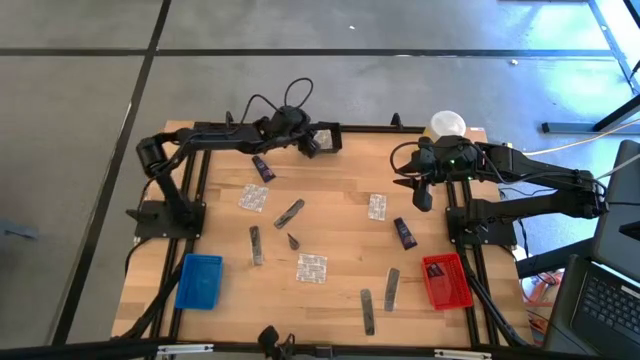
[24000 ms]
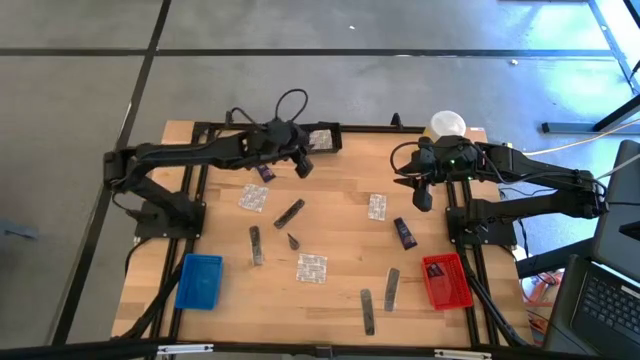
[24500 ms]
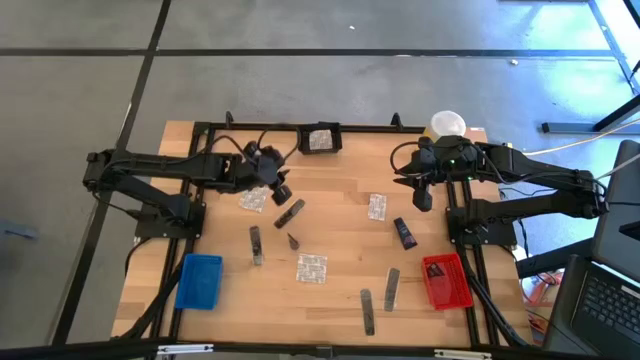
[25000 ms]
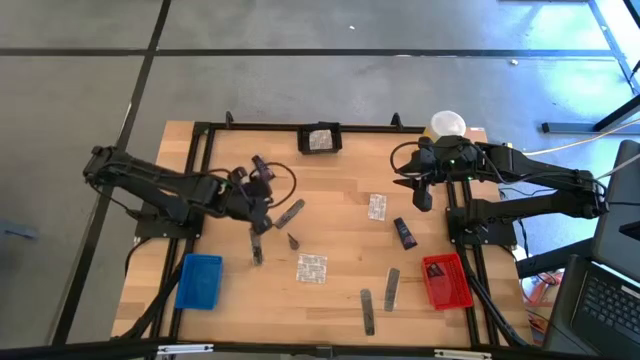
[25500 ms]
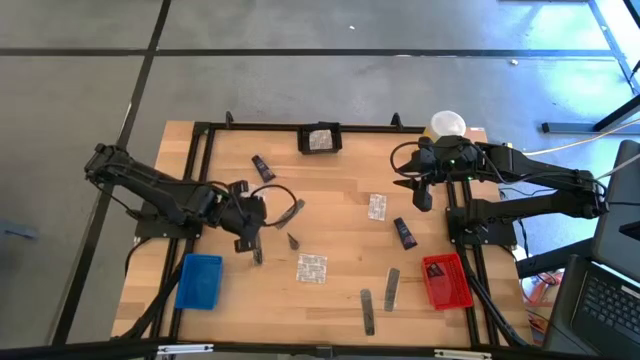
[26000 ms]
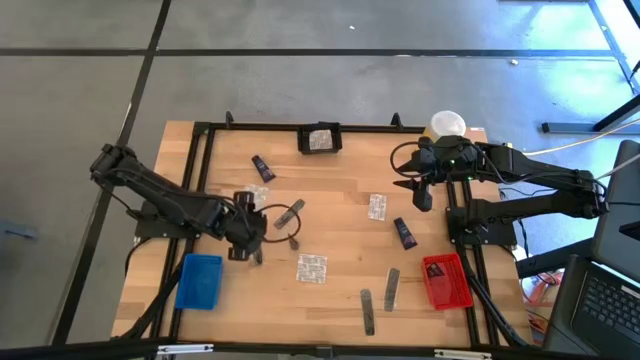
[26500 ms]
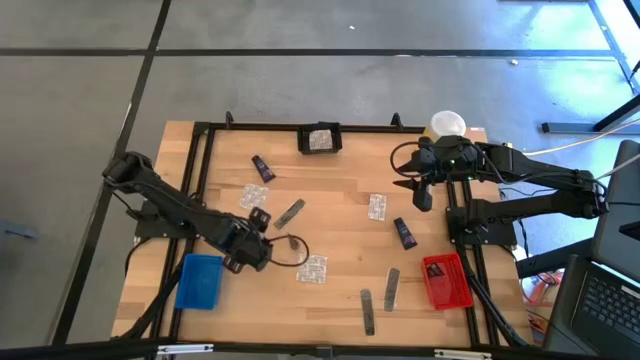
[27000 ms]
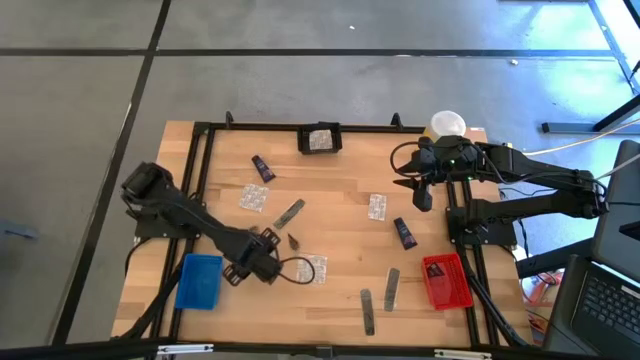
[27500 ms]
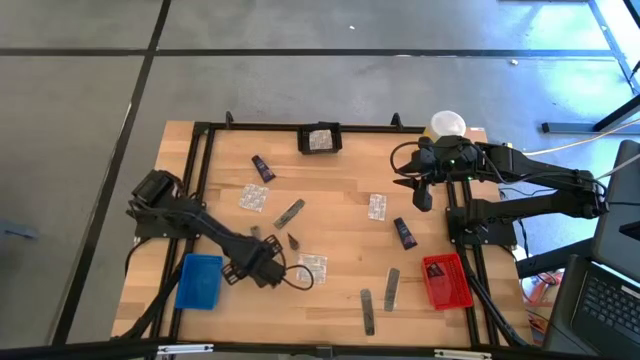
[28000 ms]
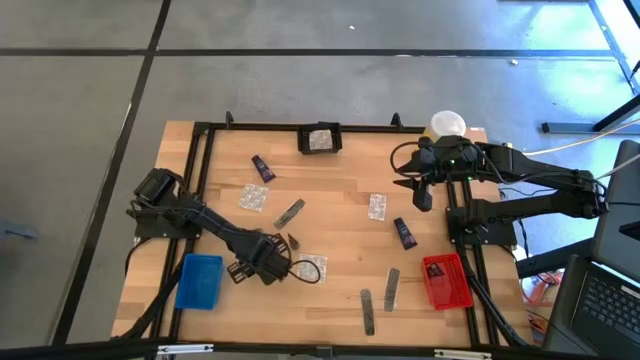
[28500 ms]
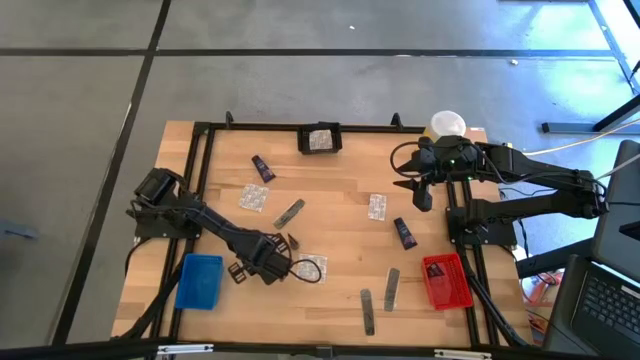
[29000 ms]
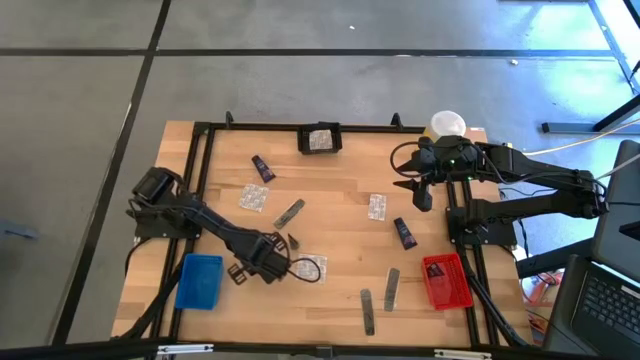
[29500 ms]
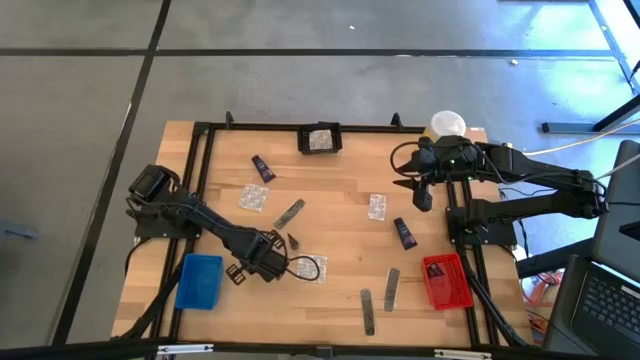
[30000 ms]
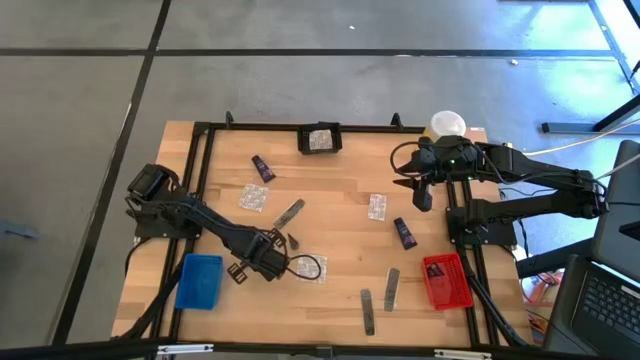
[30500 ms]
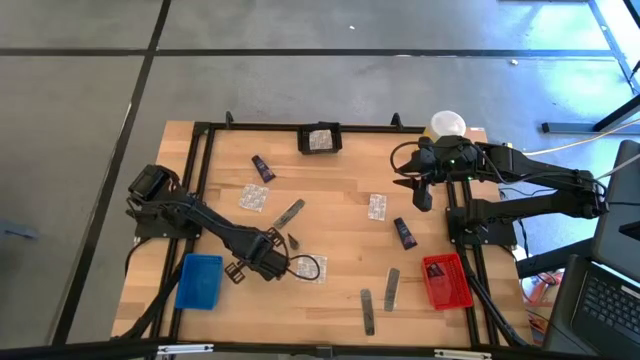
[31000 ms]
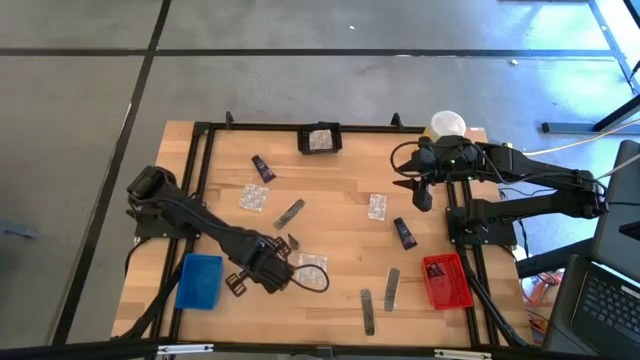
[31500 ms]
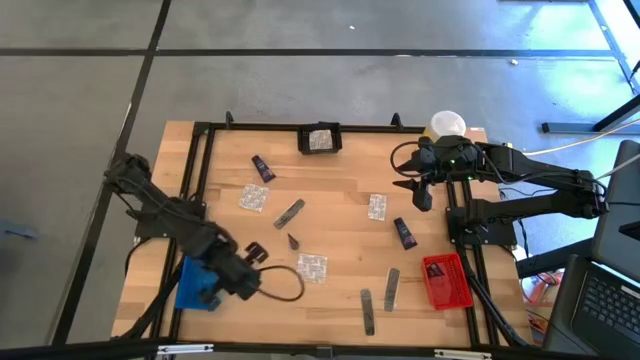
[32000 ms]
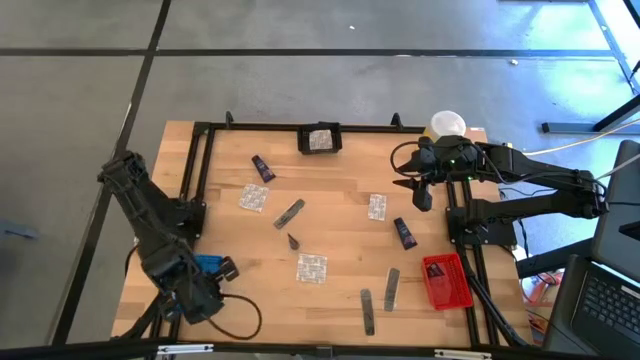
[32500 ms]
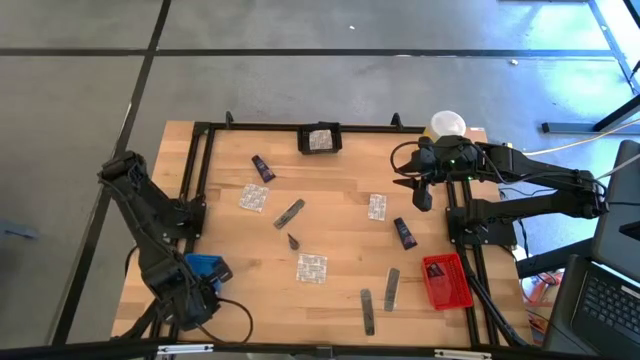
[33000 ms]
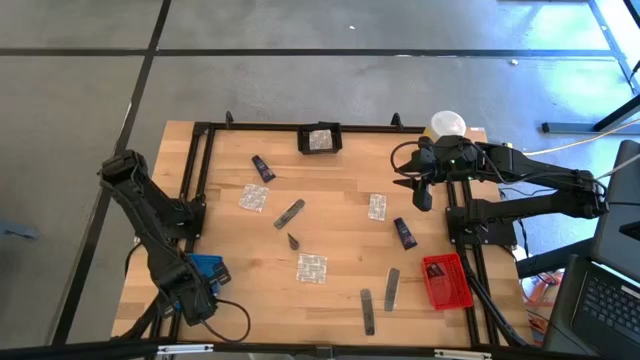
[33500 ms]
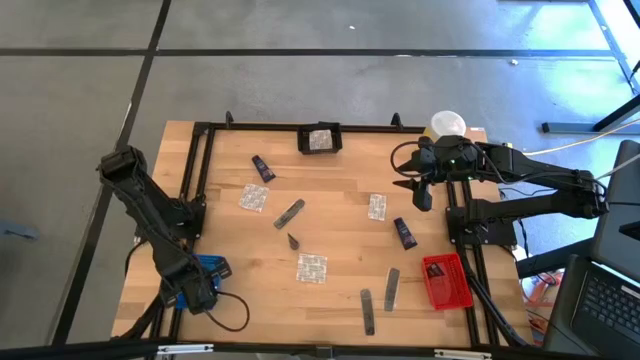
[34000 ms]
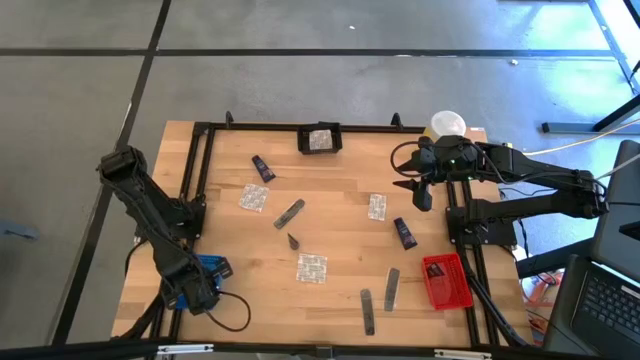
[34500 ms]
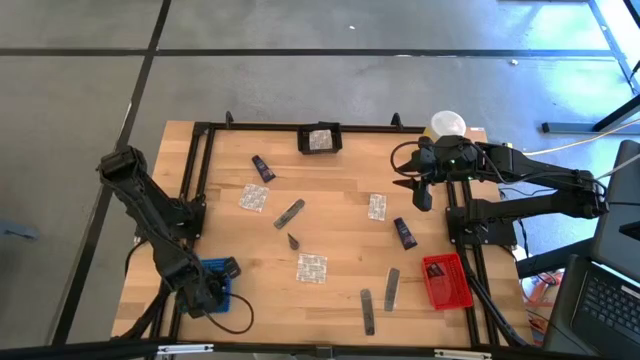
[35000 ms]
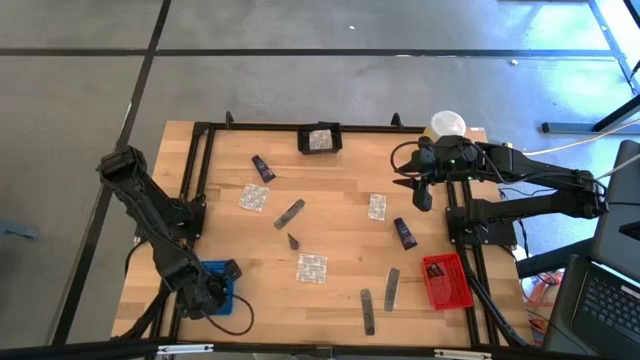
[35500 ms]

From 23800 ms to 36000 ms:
Task: Pick & Place Travel size toiletries
Put the black comb into the blue bin

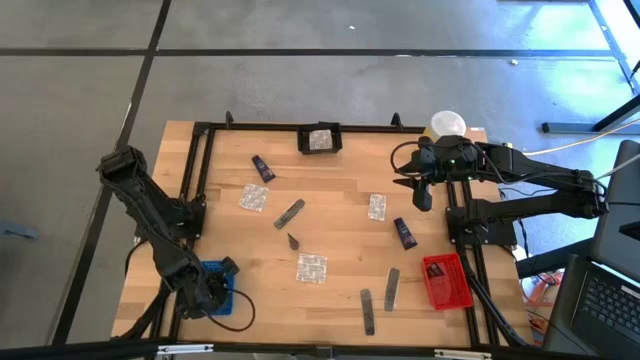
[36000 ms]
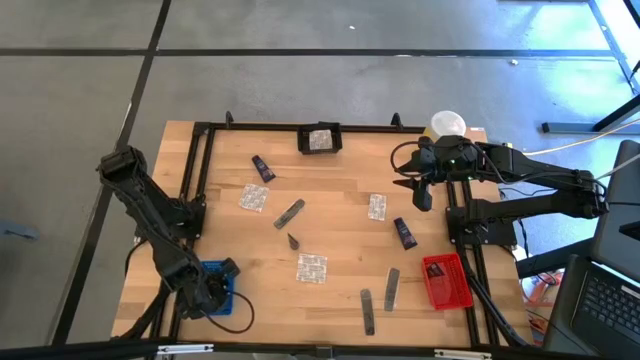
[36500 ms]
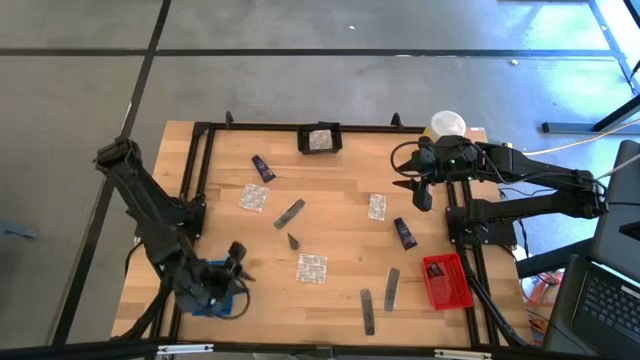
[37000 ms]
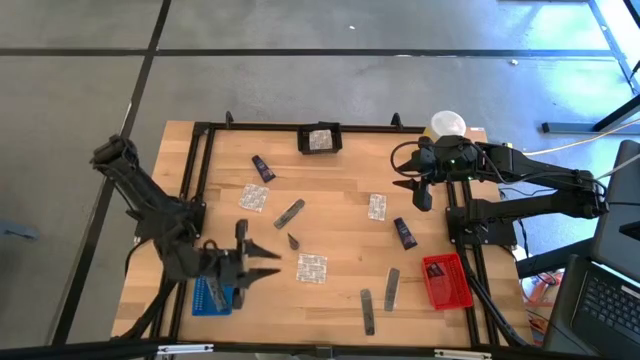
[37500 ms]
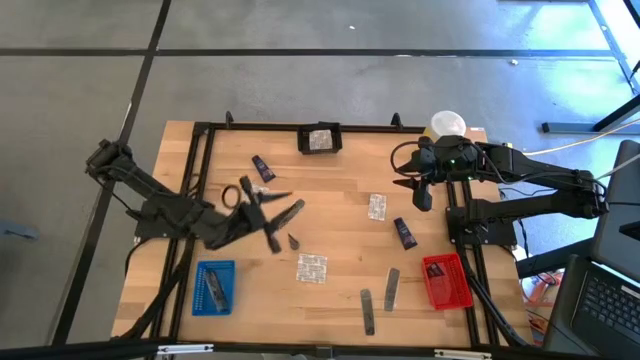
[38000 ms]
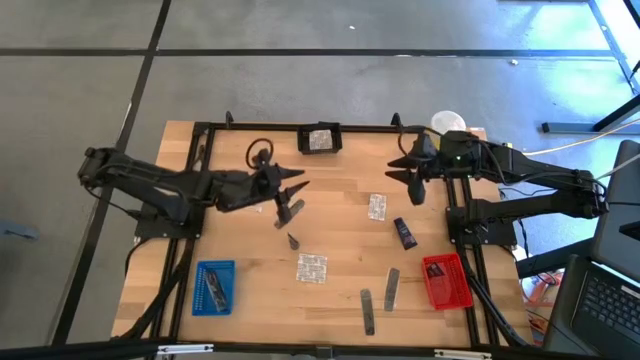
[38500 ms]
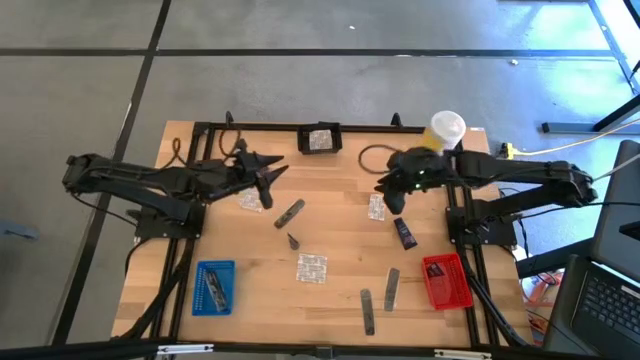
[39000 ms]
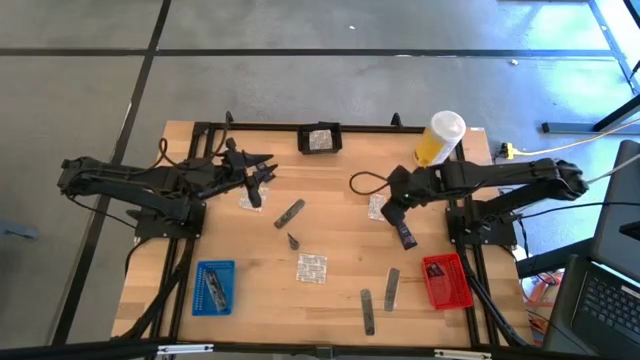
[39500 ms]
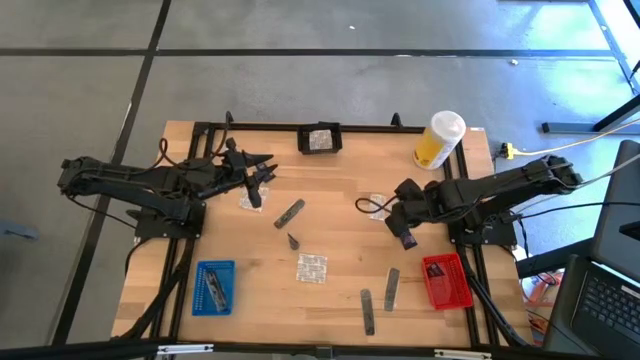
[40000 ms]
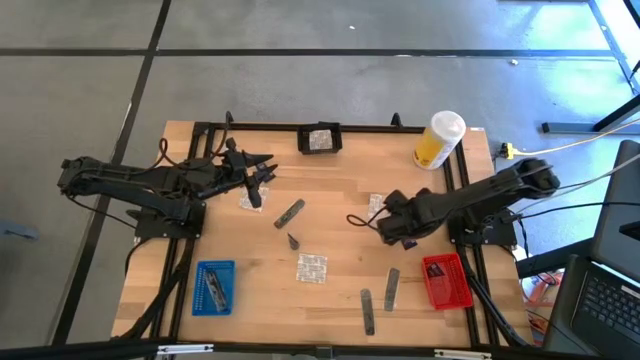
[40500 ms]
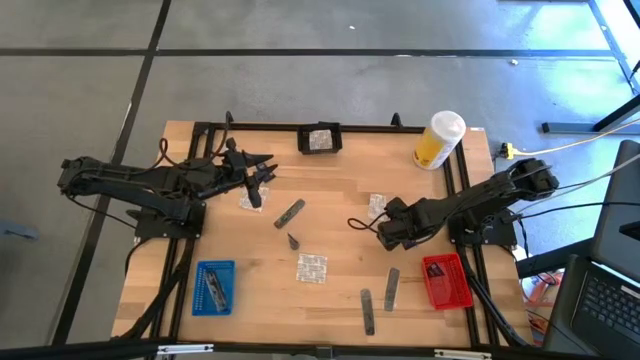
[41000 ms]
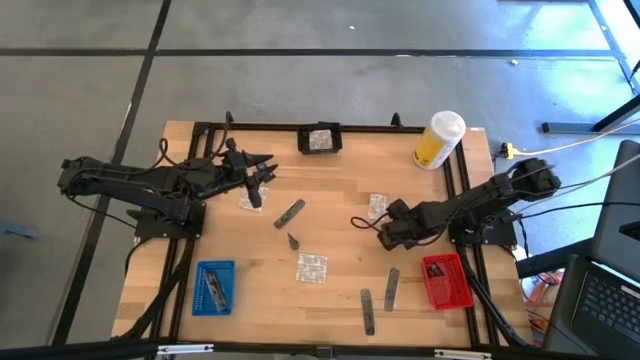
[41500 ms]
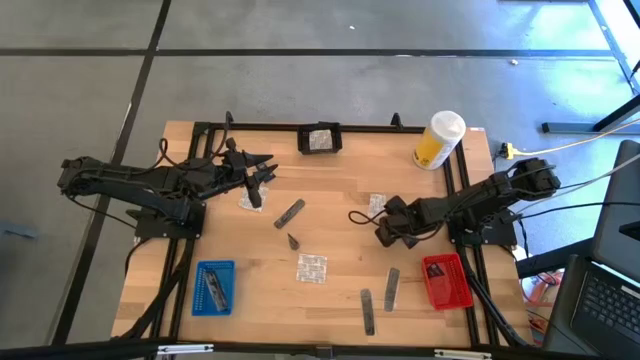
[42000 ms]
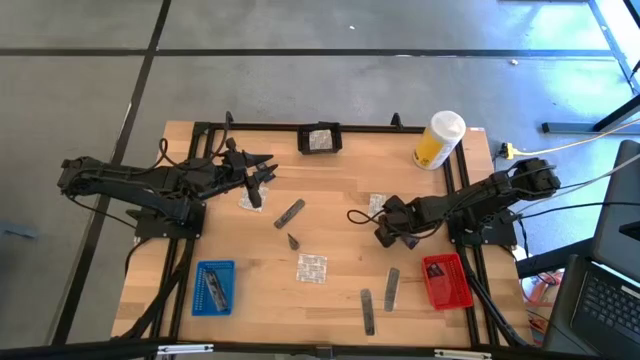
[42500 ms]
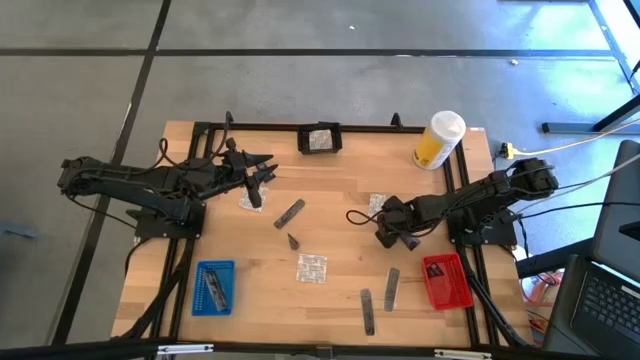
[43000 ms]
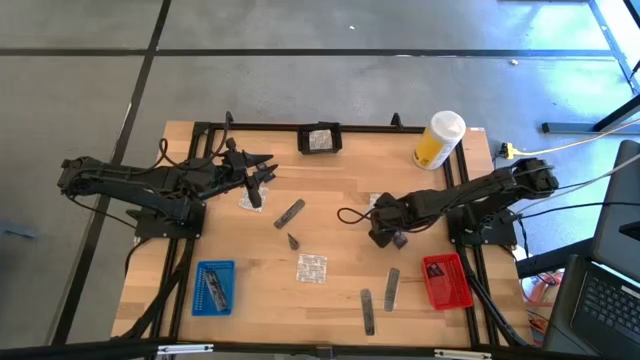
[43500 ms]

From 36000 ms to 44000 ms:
Put the blue shave butter into the red bin

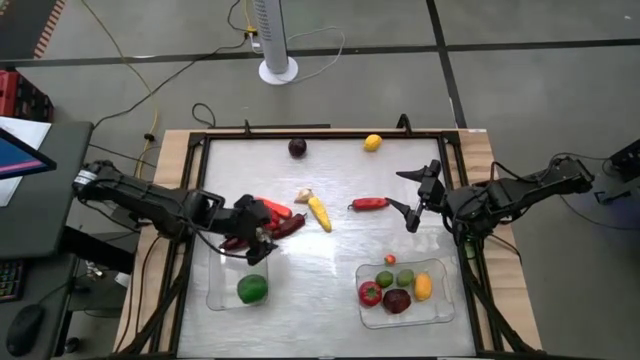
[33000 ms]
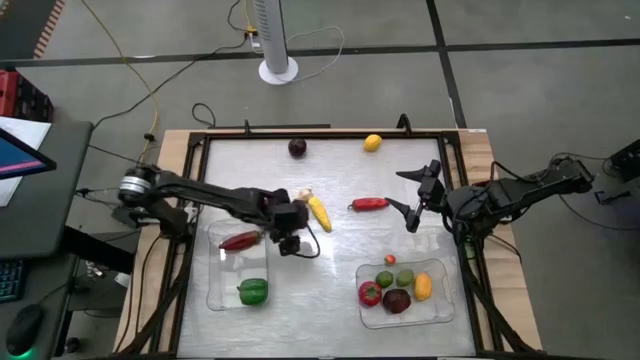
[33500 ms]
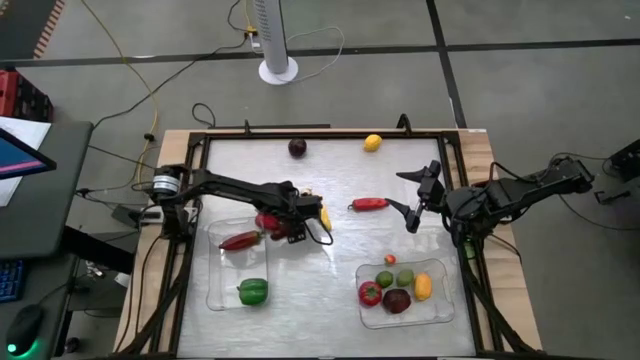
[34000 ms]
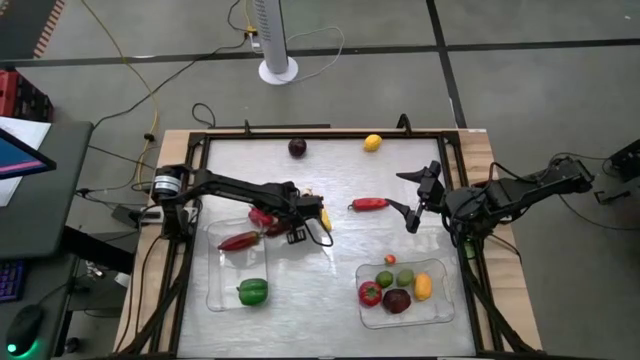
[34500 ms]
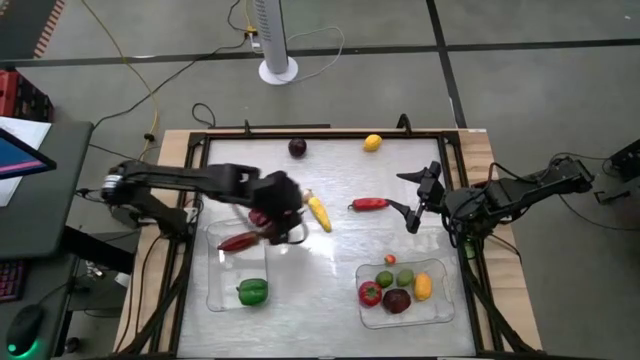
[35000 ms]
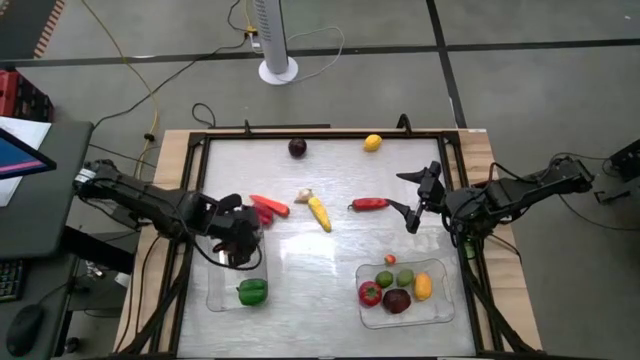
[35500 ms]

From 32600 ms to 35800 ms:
Task: Sort produce into baskets
Put the dark red chili pepper into the left transparent bin
